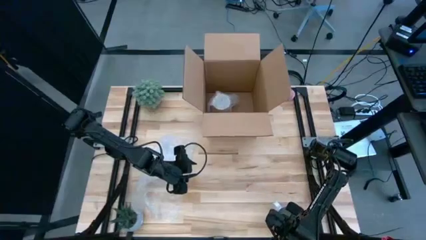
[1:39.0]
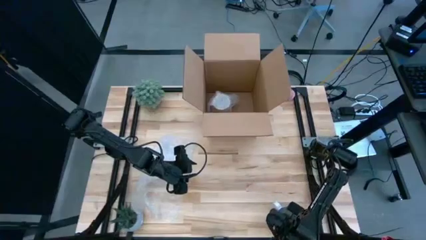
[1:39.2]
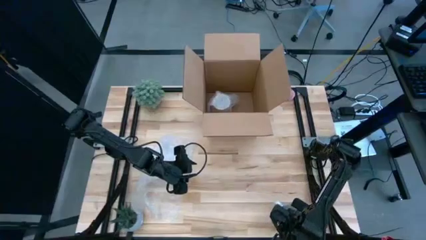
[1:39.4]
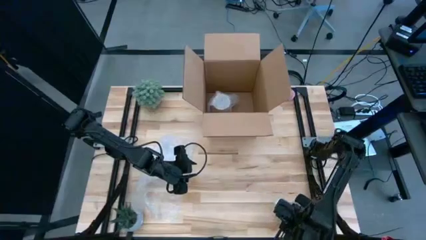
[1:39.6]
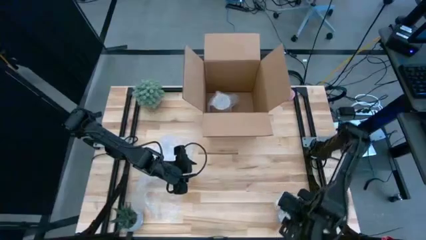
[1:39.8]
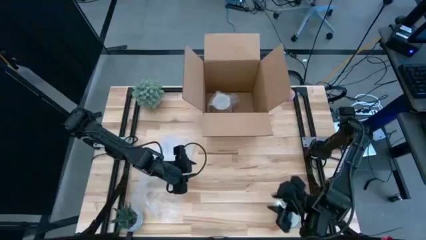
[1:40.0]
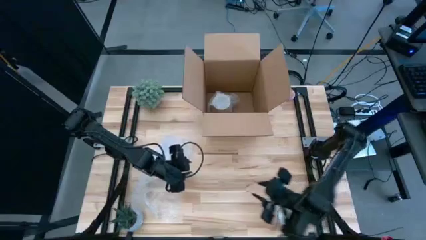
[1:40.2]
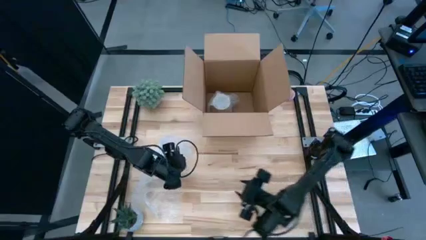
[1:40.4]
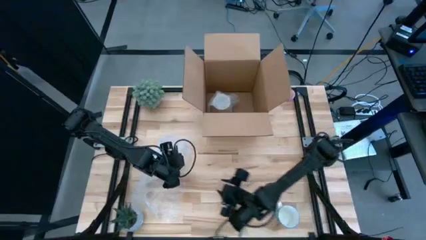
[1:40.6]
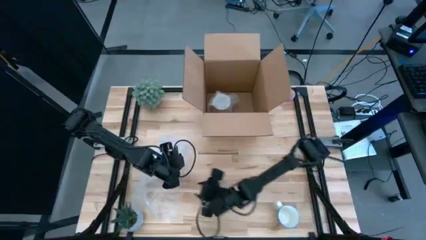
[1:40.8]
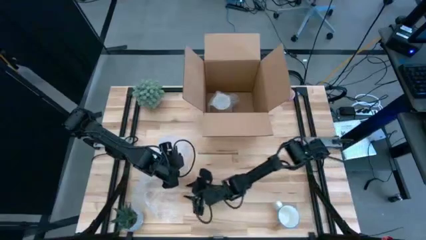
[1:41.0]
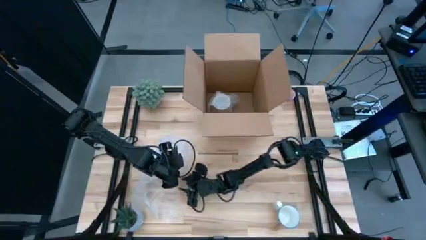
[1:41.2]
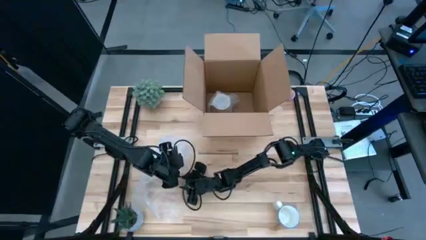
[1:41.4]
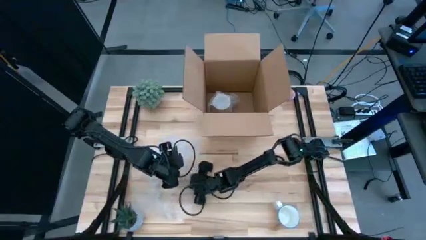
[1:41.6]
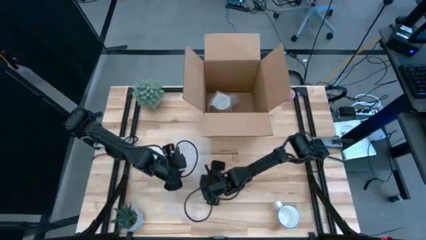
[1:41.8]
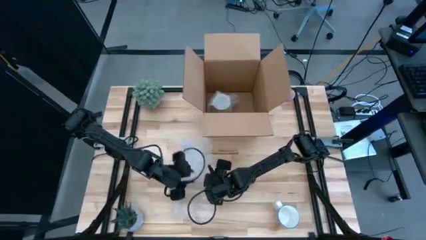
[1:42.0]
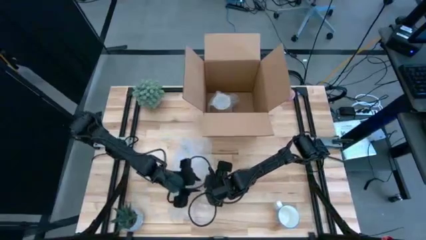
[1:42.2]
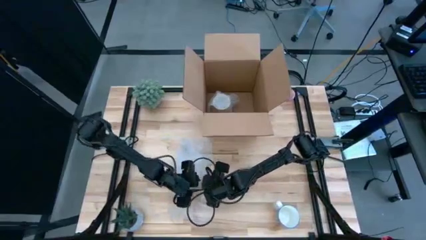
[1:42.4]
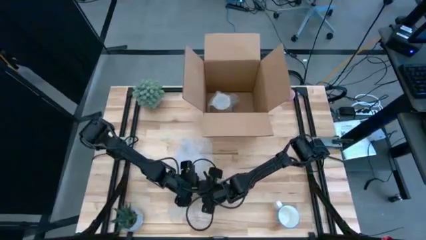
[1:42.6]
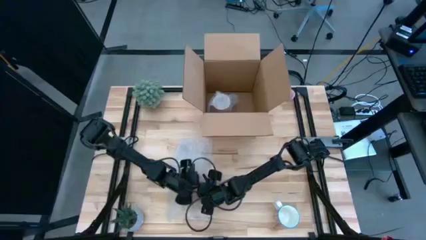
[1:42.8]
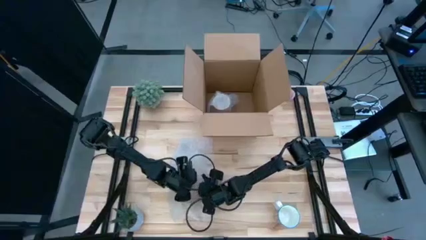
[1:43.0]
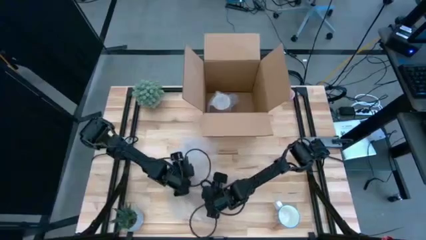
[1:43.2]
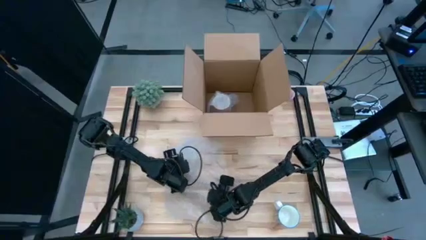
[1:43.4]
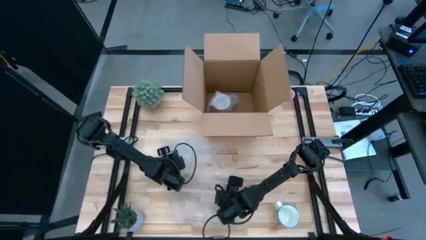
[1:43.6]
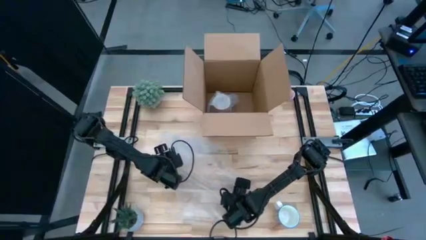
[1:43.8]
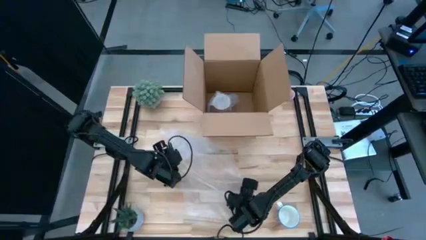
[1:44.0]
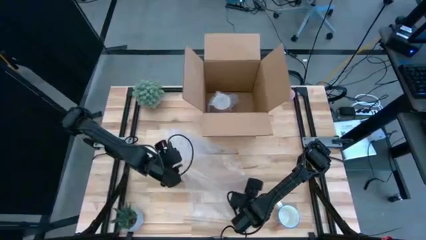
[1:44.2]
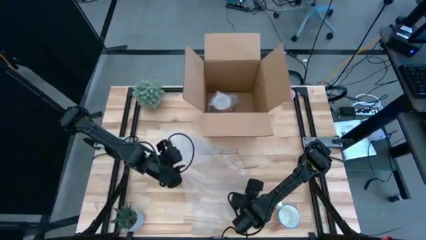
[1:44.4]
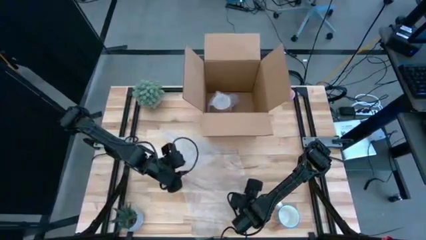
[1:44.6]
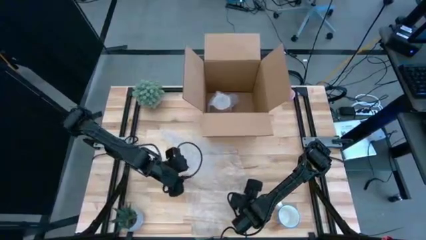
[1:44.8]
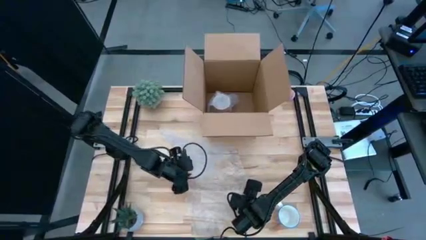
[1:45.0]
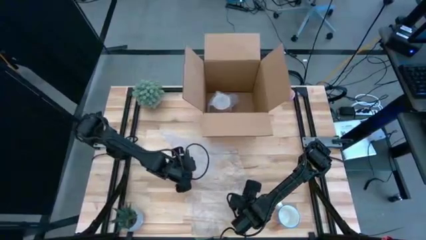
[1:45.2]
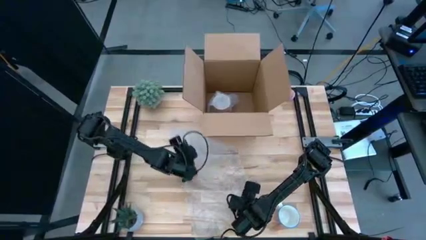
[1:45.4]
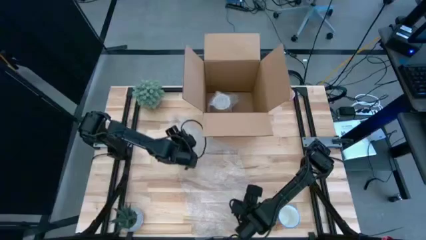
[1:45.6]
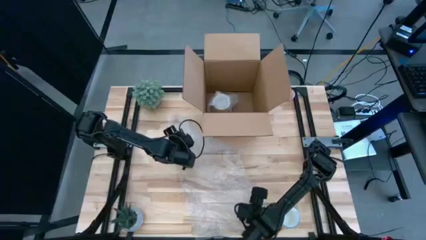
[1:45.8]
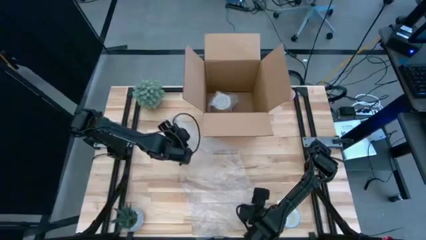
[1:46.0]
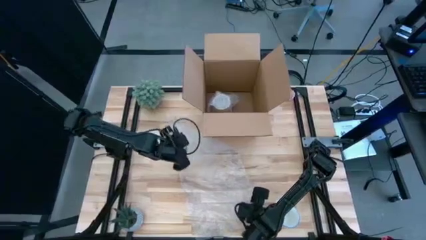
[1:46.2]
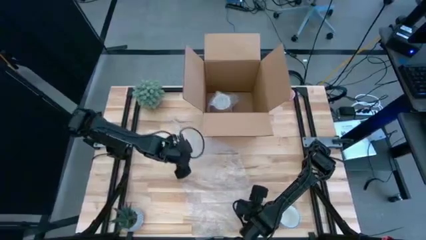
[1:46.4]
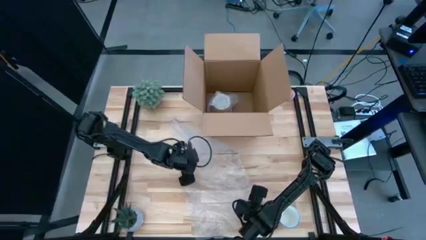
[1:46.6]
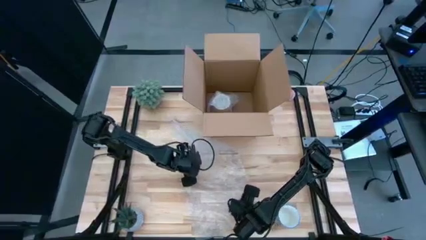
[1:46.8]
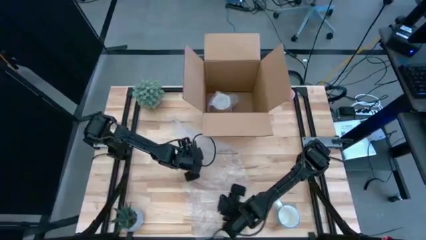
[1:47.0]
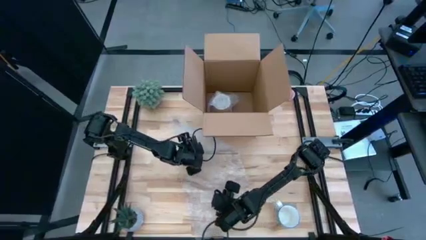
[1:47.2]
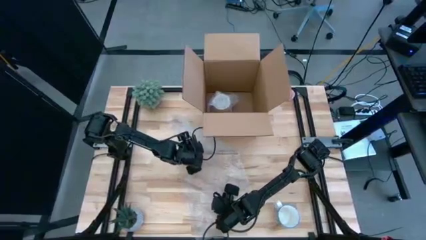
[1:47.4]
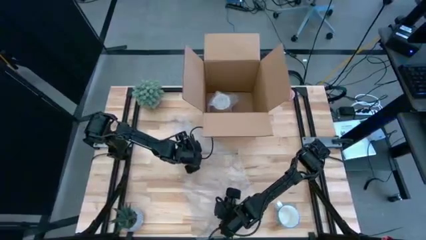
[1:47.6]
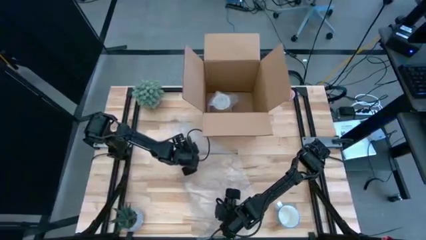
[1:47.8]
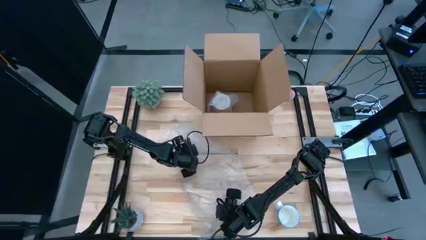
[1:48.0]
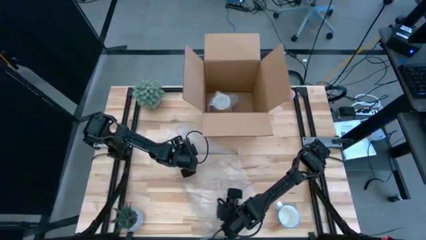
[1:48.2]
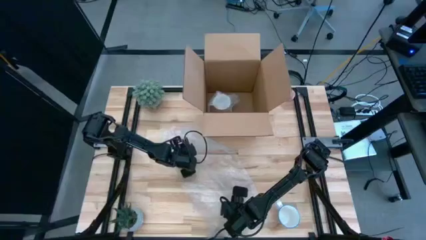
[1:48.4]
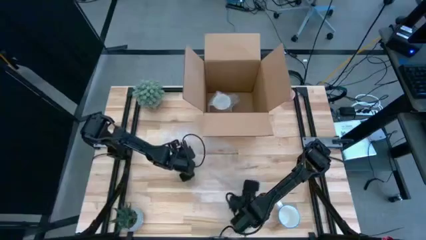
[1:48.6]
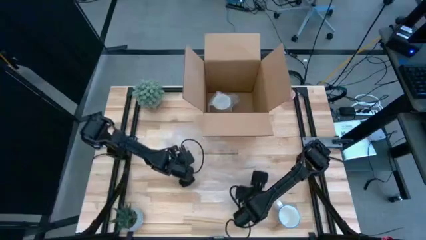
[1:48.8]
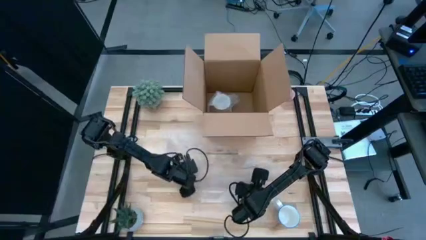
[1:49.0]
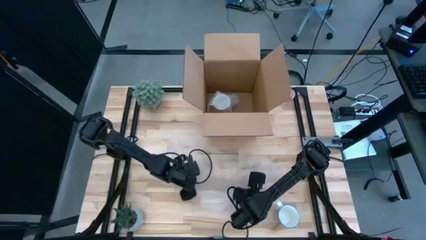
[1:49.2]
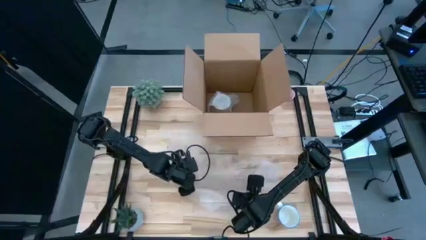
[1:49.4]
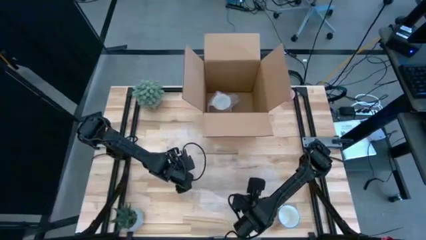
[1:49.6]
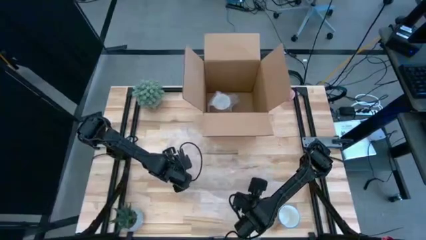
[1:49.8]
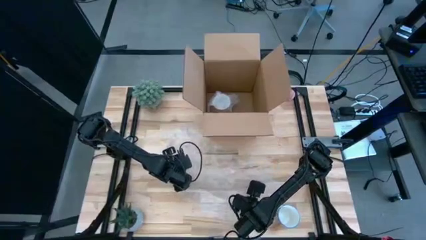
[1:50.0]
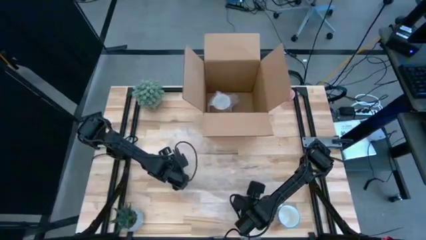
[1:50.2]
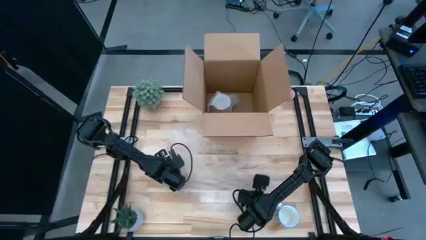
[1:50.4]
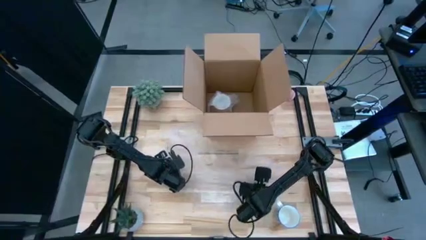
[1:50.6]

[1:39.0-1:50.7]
Task: wrap mug
Prepare the bubble wrap

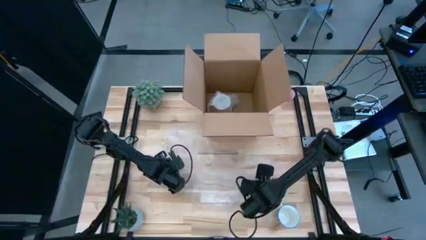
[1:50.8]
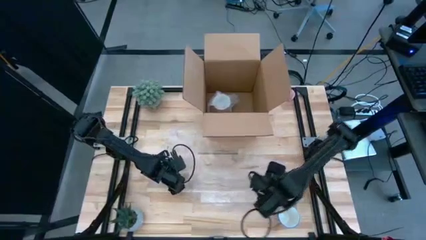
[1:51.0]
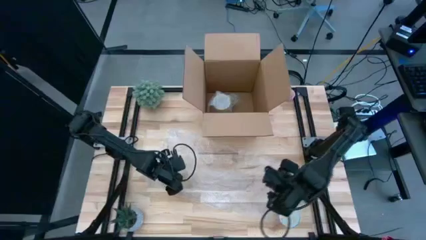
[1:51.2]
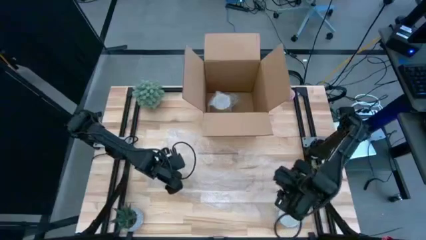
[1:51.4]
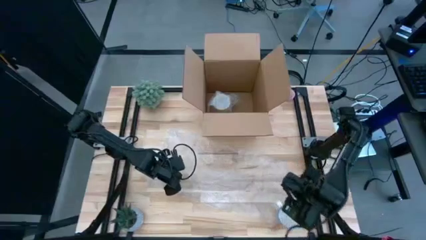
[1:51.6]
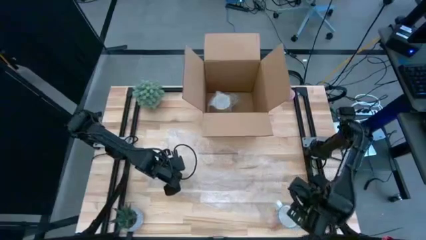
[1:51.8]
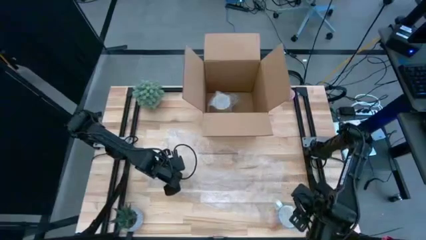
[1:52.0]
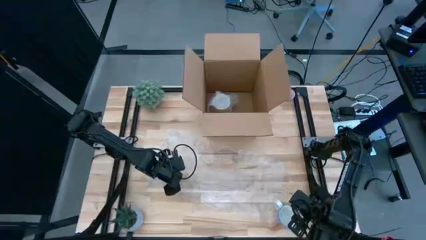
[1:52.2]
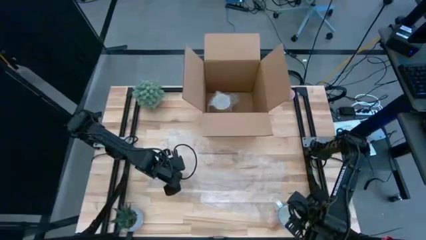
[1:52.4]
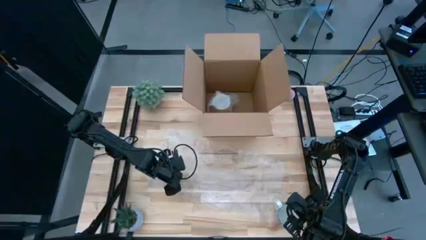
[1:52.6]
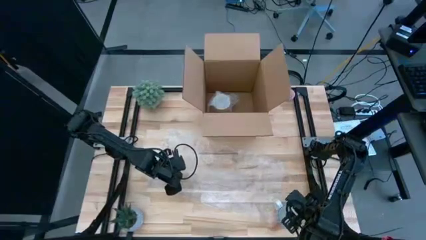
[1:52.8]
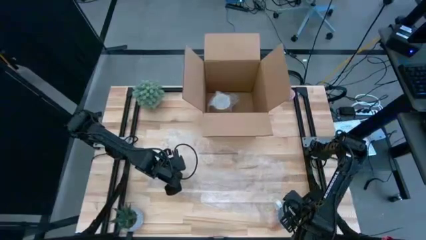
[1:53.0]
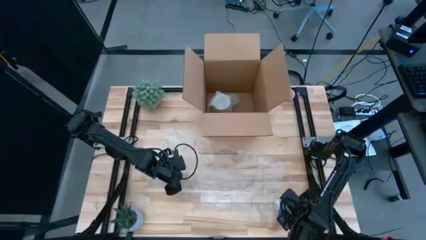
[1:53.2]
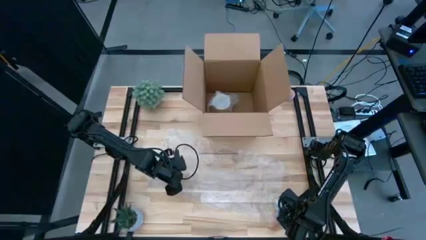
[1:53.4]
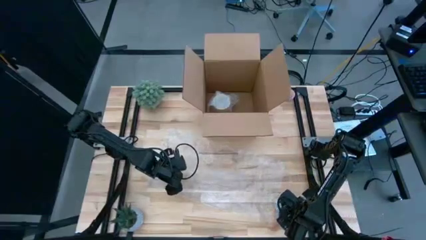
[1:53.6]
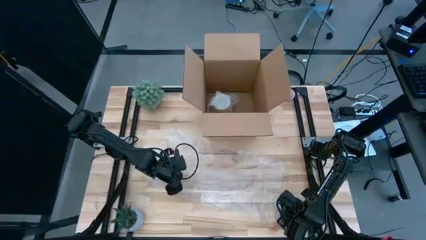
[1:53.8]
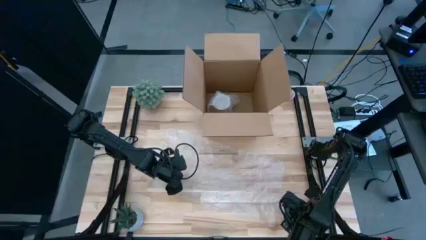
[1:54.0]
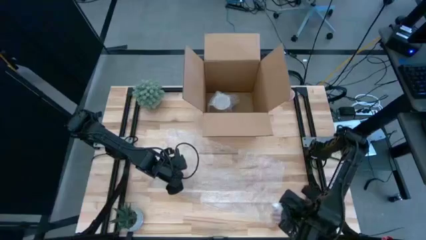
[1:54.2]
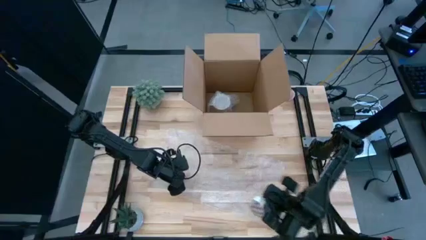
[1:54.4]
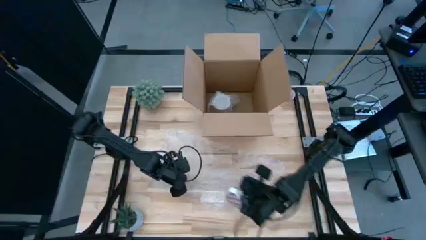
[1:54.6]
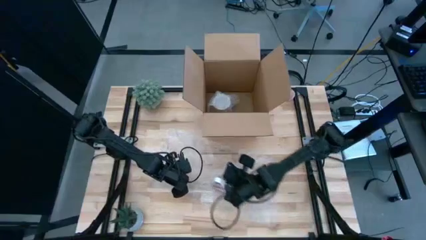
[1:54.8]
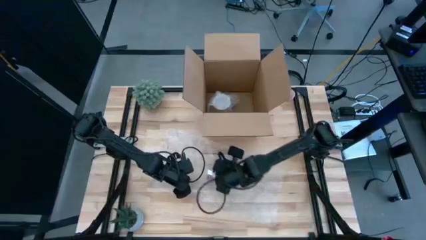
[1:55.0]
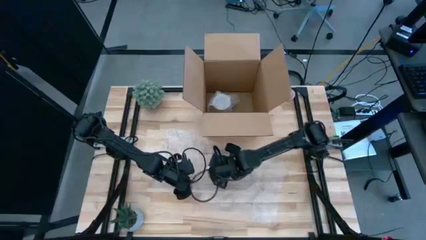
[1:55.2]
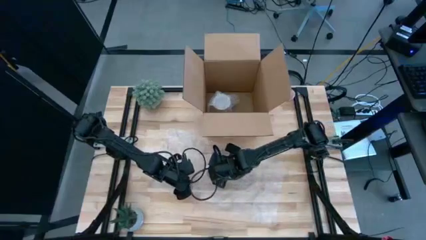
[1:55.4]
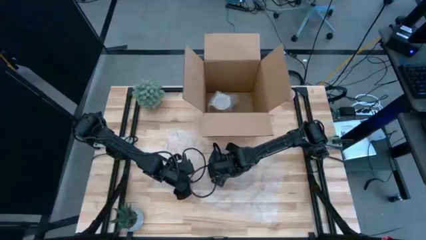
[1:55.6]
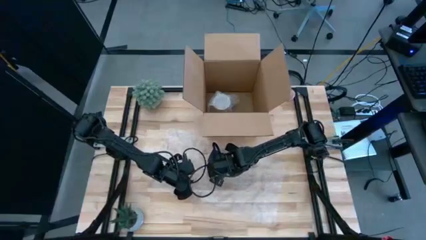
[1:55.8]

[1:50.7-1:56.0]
Put the red mug on the bubble wrap
